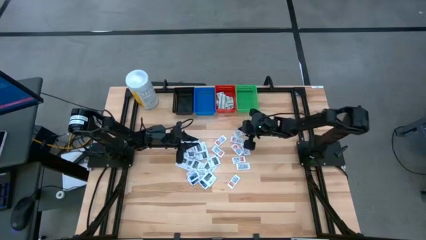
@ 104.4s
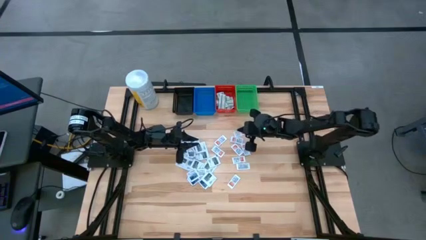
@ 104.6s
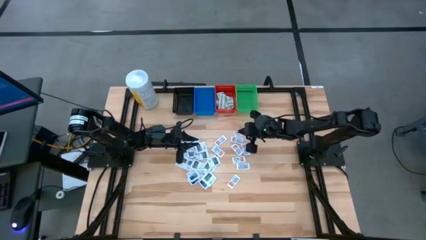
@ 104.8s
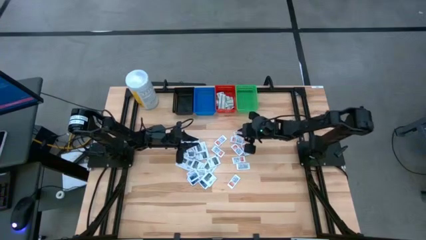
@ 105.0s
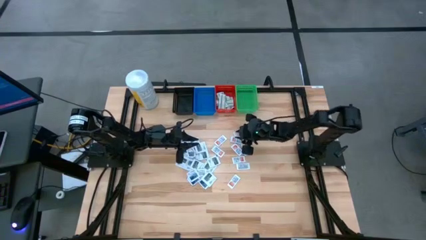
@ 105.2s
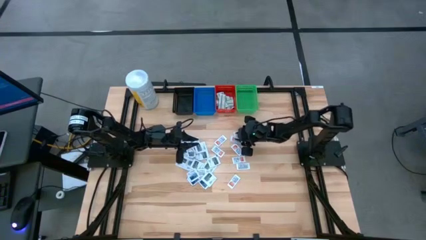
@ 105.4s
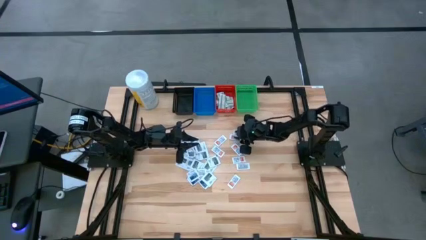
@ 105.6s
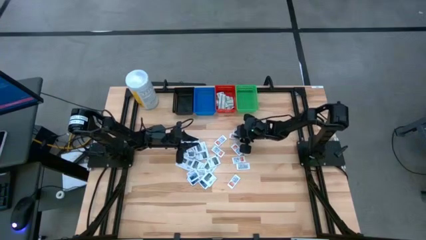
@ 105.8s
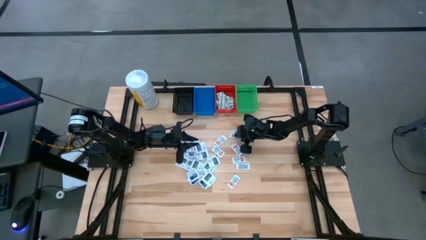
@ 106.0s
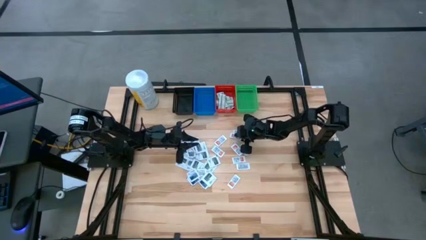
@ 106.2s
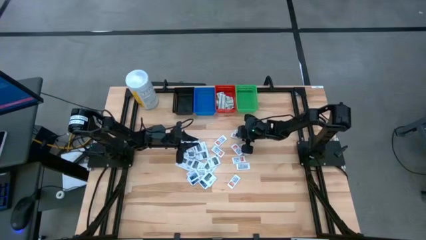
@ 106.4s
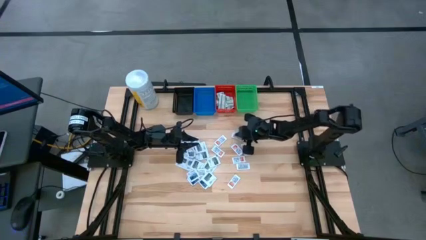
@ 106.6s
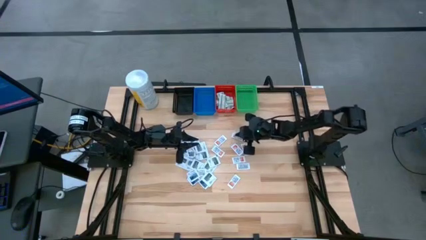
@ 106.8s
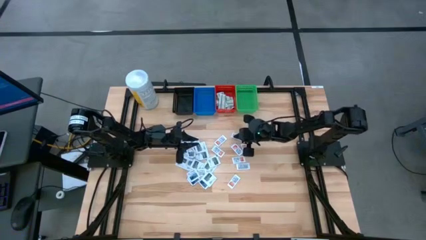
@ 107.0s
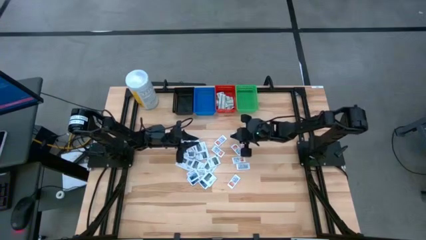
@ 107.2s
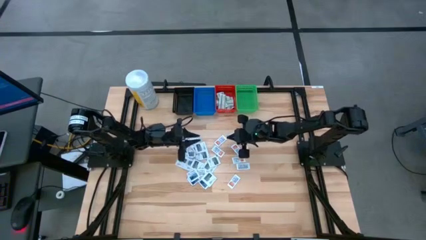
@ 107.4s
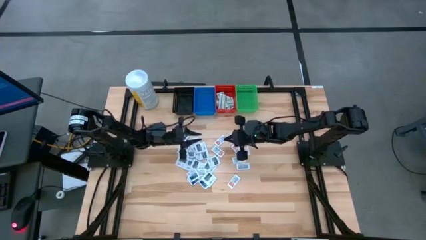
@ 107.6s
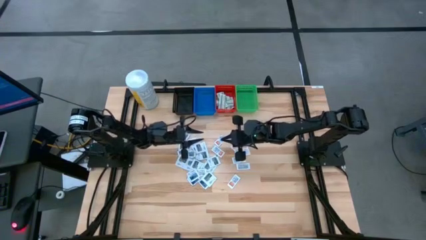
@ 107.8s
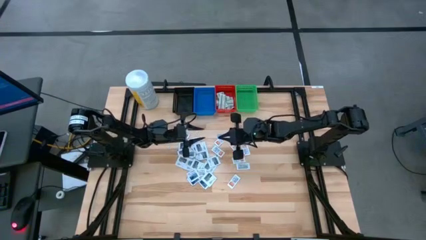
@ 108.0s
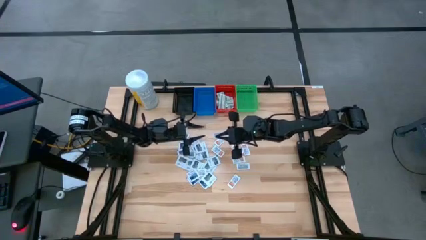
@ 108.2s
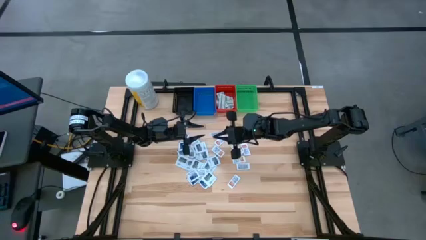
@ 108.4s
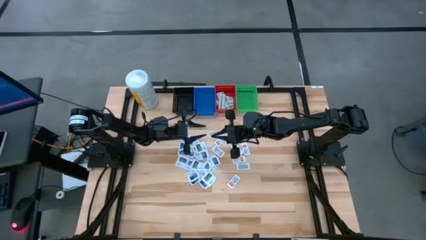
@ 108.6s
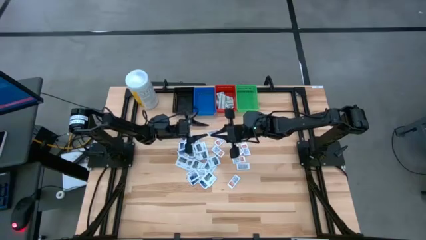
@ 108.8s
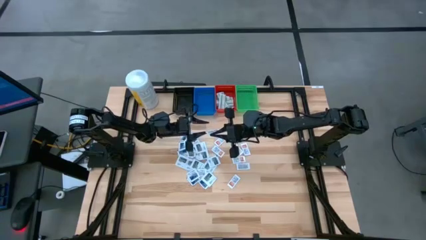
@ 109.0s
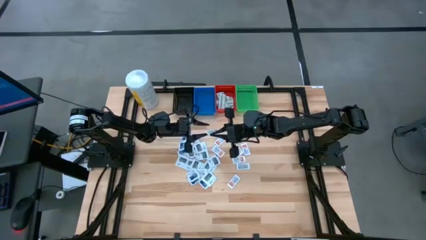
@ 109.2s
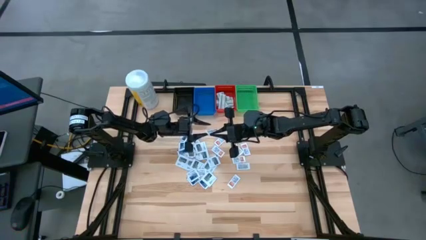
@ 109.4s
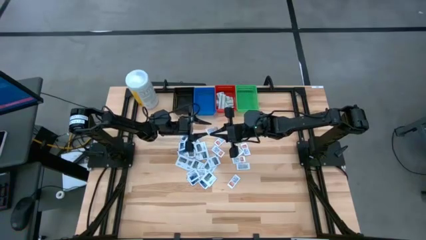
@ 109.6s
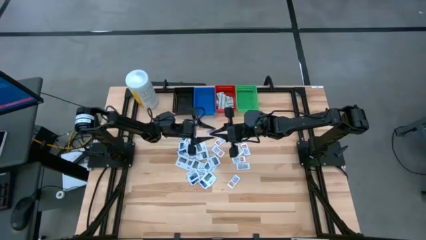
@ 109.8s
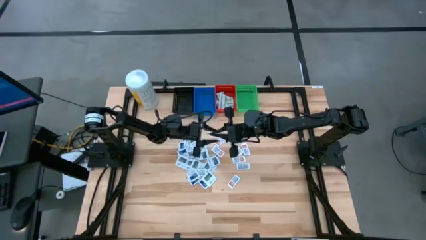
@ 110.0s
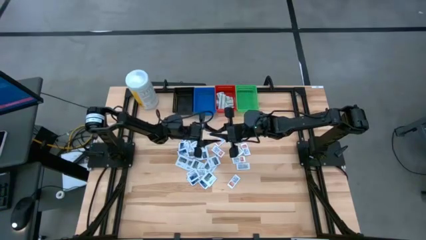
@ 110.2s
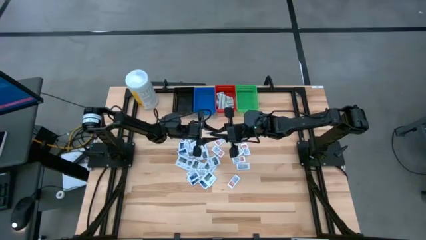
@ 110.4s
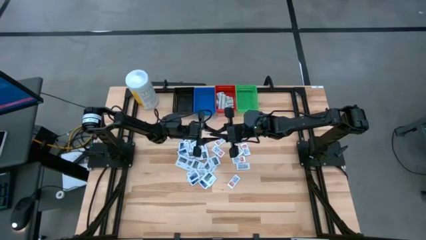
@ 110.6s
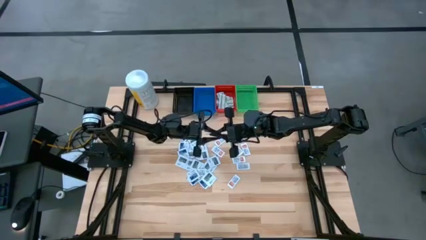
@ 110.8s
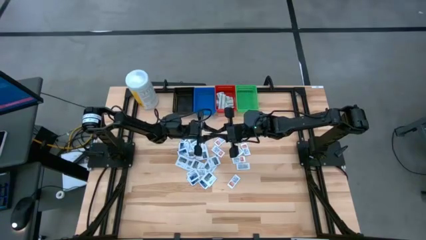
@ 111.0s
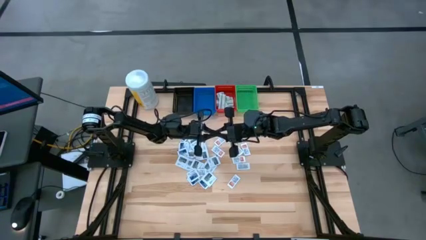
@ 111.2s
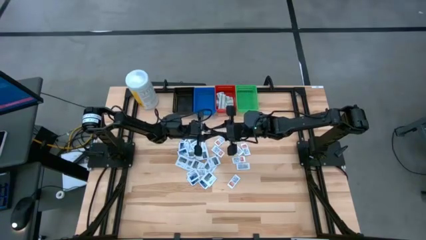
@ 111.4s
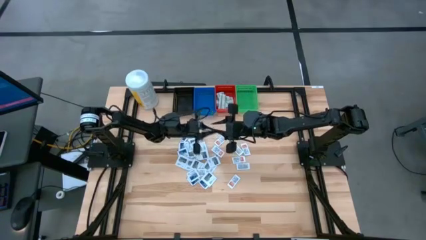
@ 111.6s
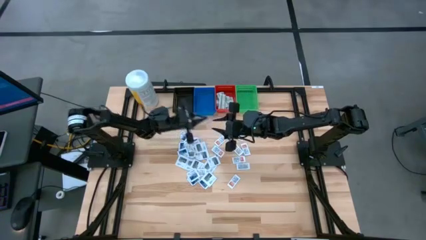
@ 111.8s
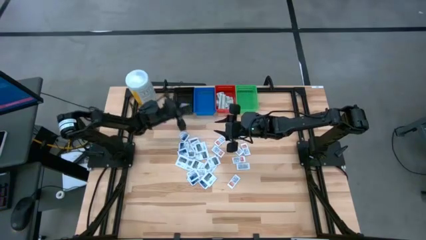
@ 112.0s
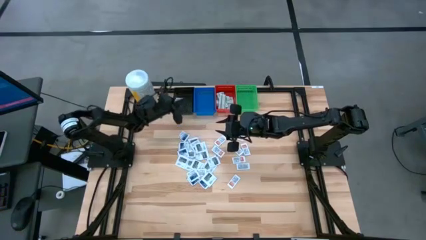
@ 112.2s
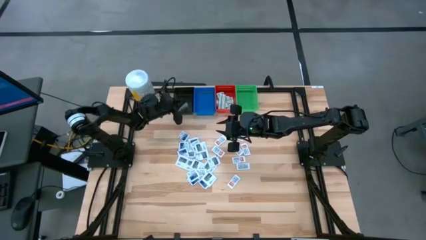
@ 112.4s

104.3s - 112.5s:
Task: Pick & Place First Aid Supplies
Put the orange ointment pack into the black bin

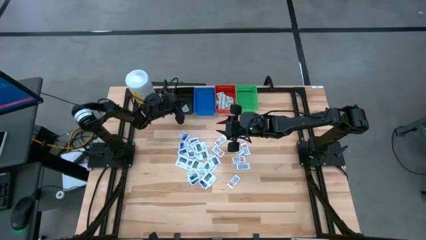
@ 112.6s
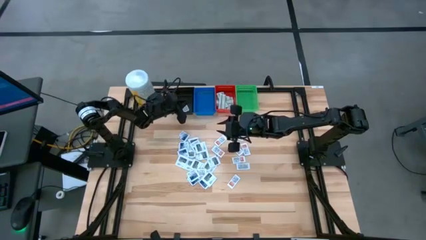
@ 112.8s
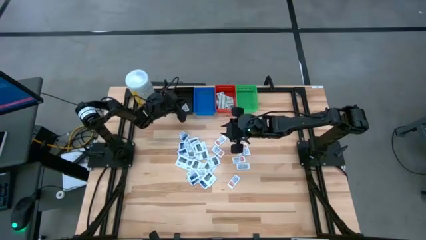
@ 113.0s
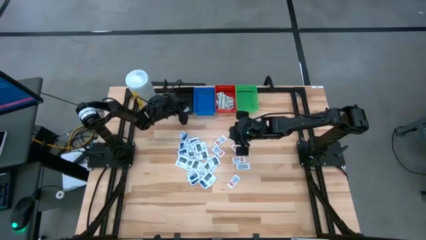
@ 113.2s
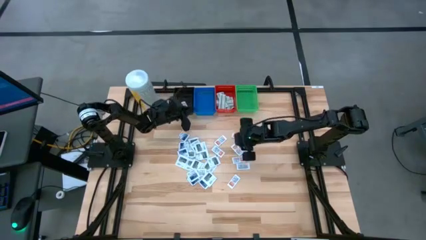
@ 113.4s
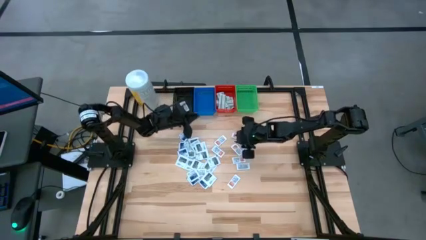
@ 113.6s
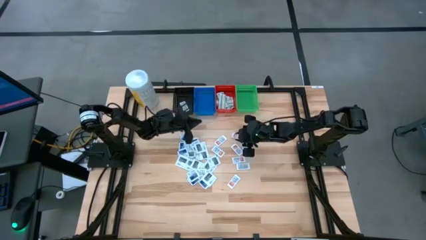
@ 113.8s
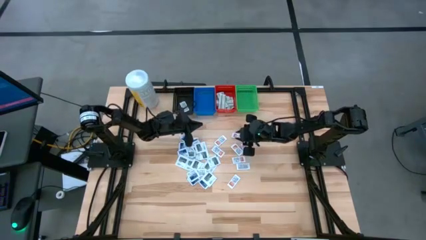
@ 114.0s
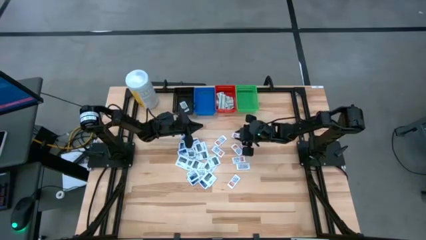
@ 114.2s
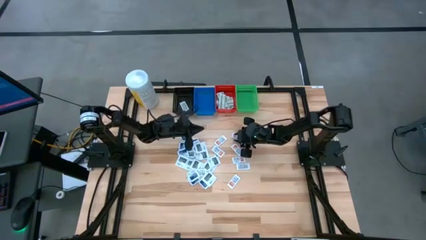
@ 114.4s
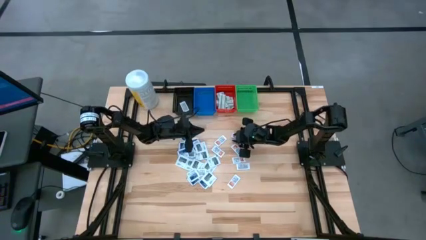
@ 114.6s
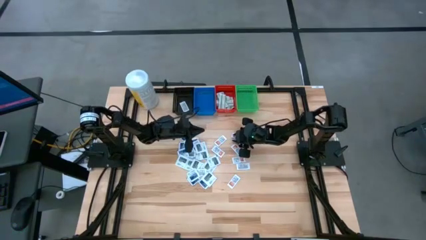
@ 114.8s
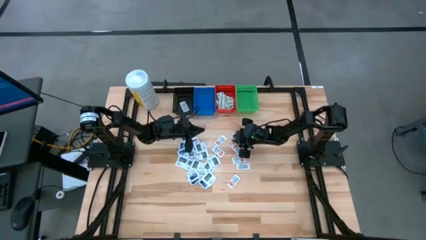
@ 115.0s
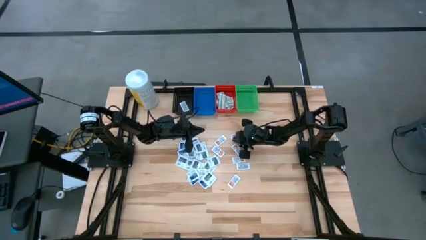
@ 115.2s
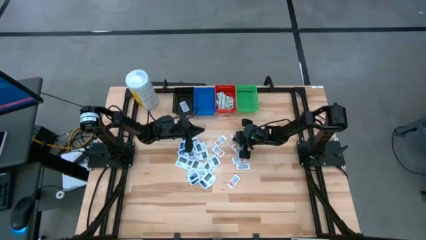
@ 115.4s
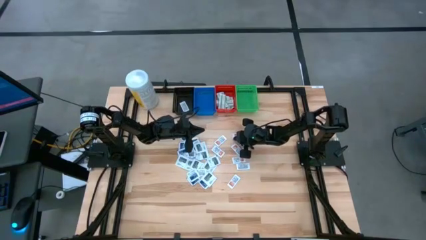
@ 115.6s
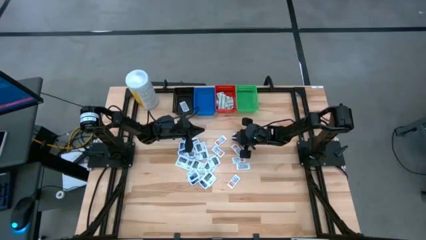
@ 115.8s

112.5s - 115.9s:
Put the orange ointment pack into the black bin

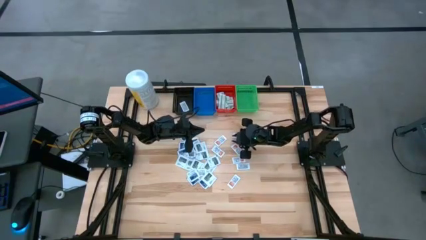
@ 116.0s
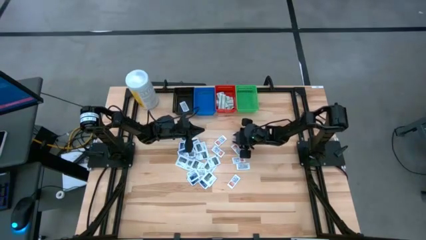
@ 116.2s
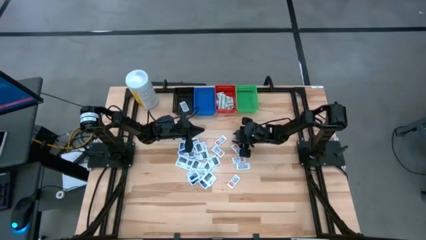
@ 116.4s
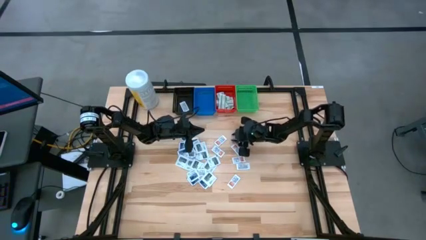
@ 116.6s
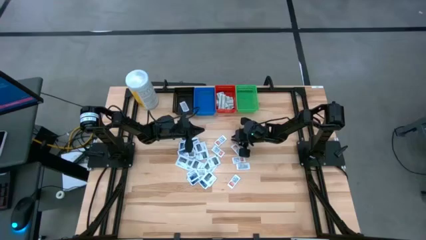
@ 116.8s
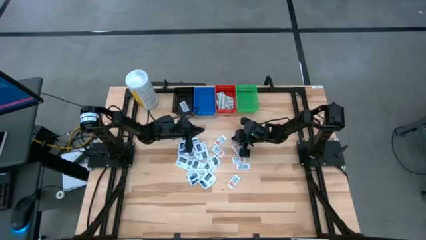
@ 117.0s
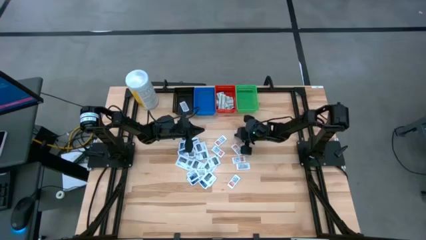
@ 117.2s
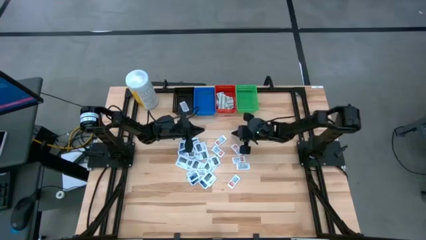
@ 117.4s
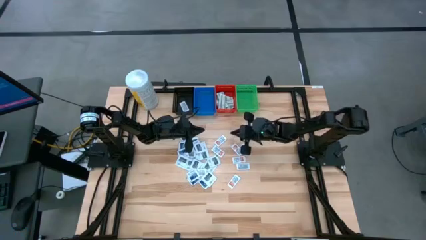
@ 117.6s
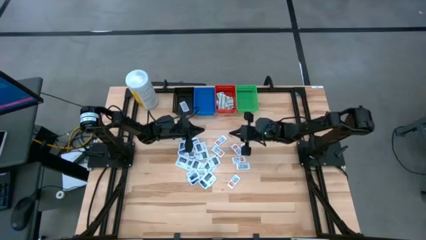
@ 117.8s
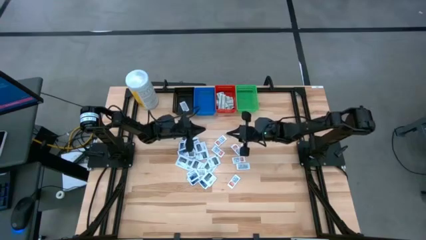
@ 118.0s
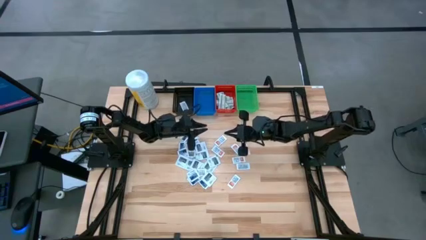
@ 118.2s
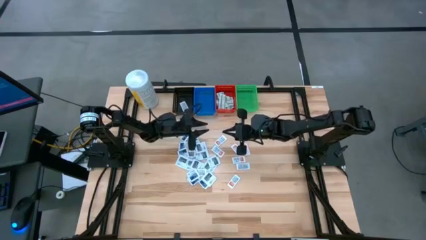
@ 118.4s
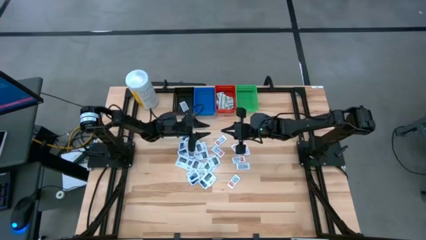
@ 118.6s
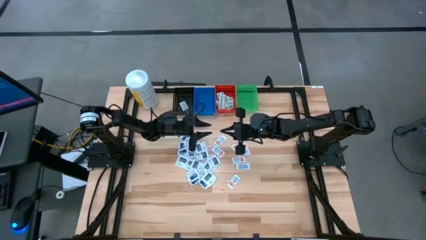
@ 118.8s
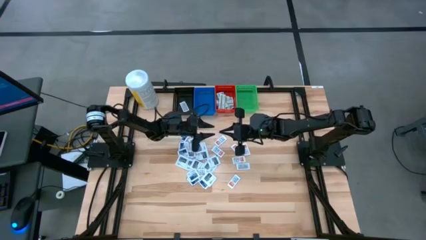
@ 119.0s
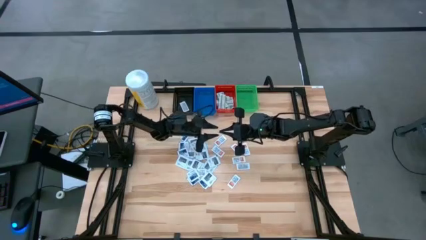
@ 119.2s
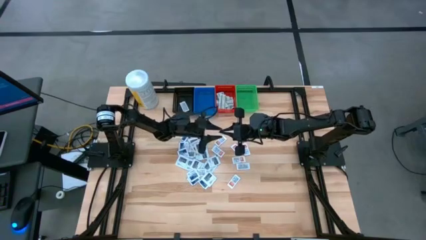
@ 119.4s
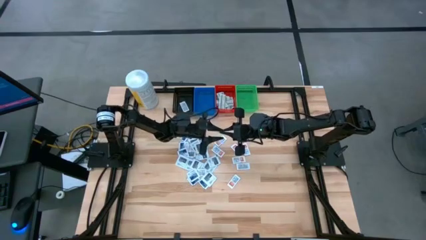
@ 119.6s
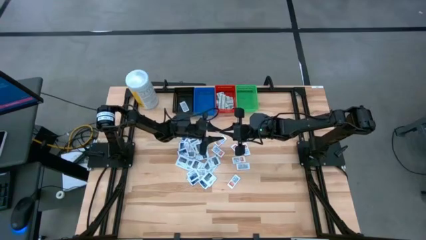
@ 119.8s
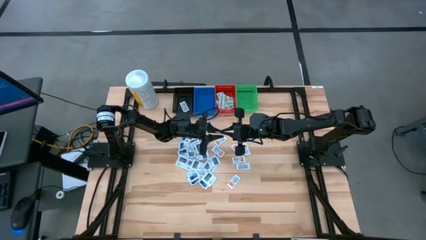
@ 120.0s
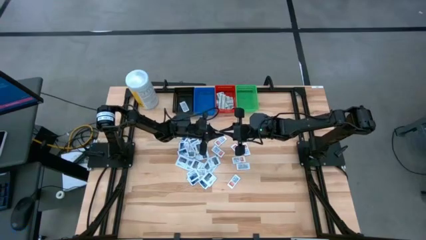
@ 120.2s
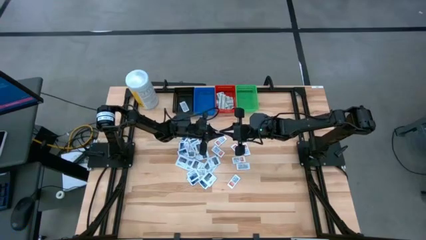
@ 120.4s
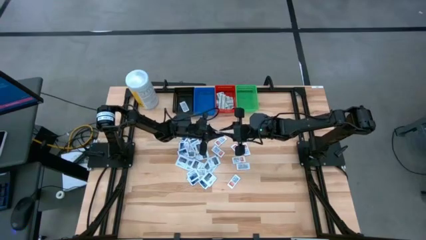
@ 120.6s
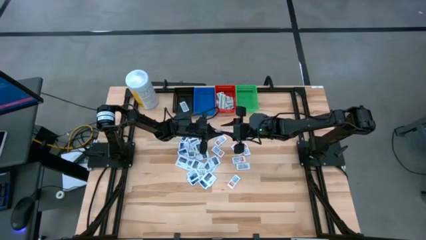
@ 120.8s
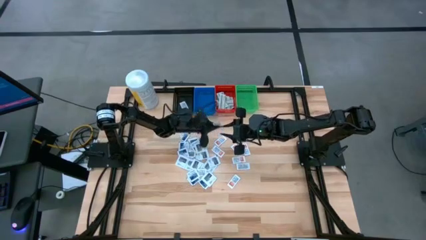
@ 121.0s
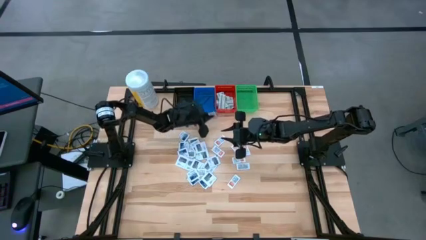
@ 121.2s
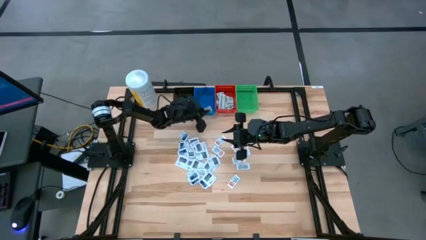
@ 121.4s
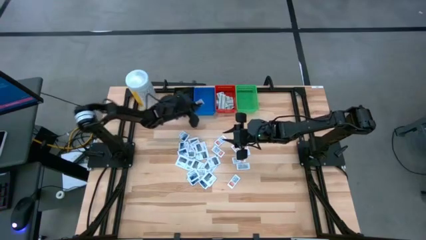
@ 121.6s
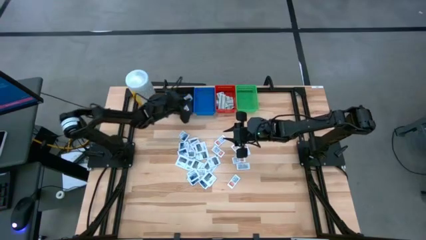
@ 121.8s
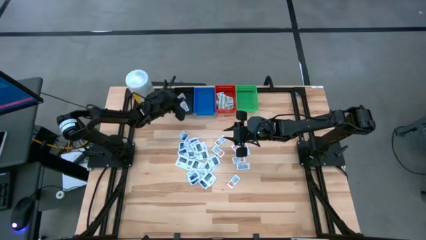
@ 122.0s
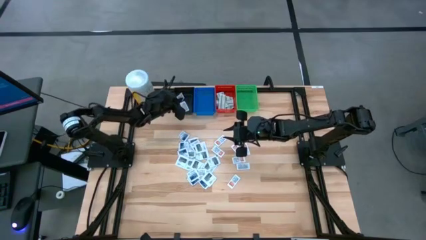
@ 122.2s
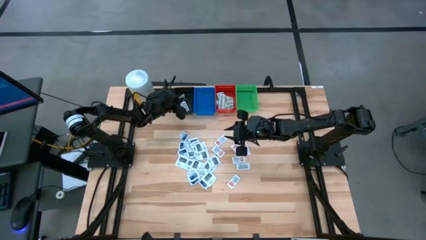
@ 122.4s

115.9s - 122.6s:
Put the orange ointment pack into the black bin
